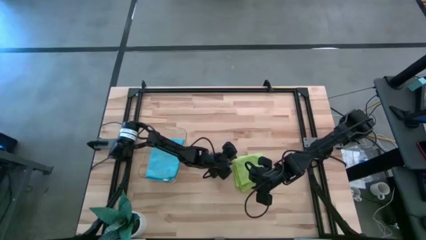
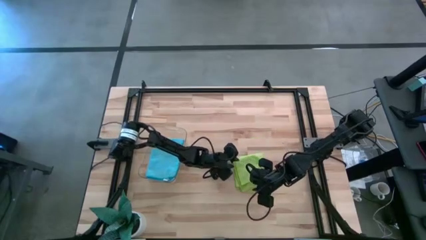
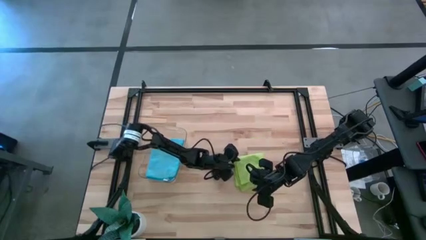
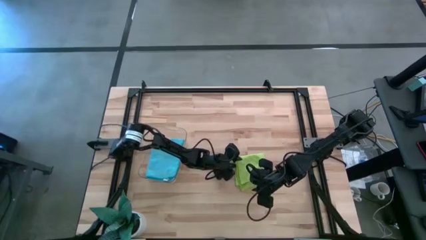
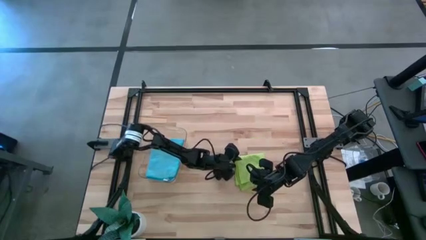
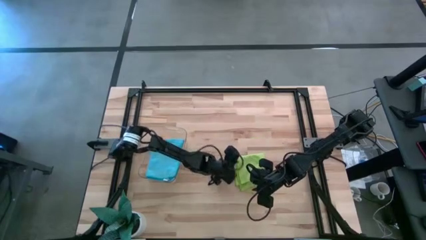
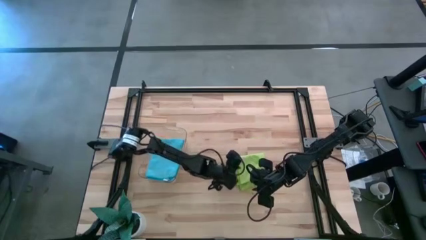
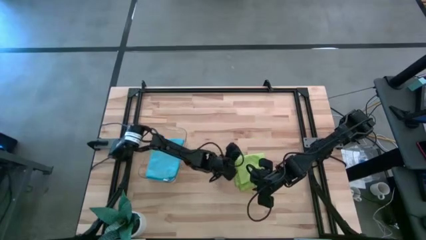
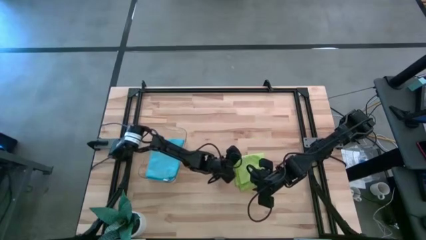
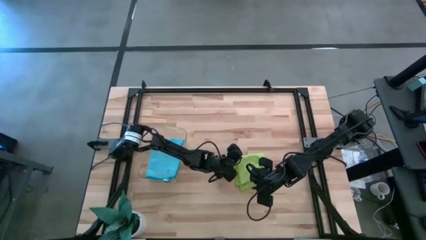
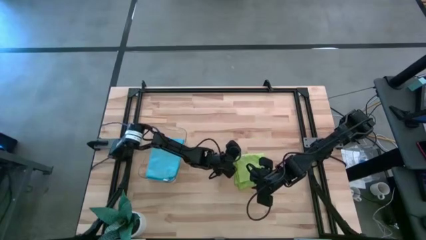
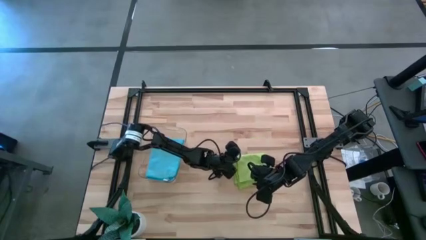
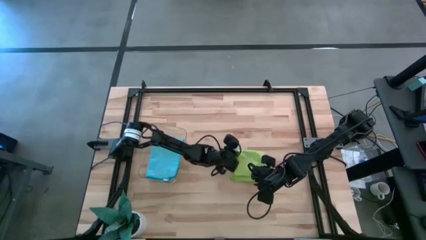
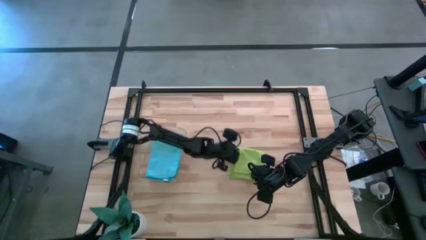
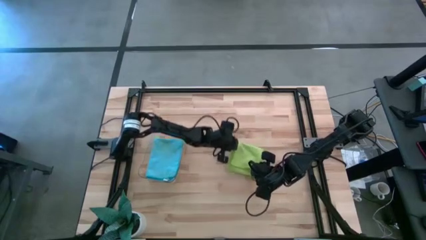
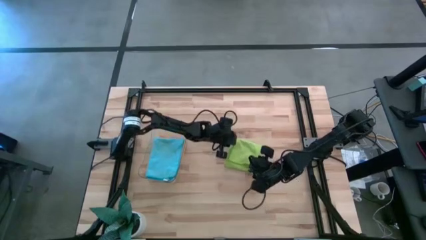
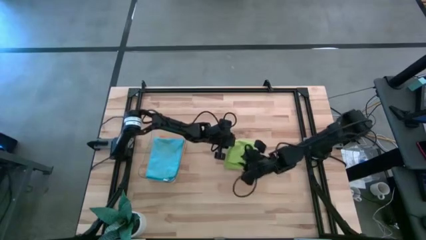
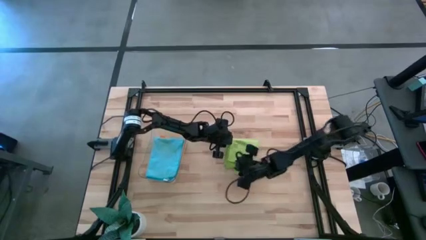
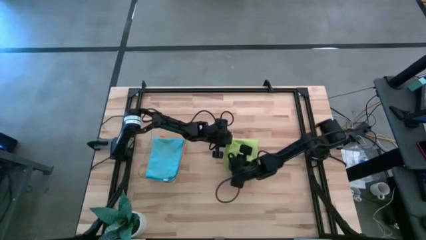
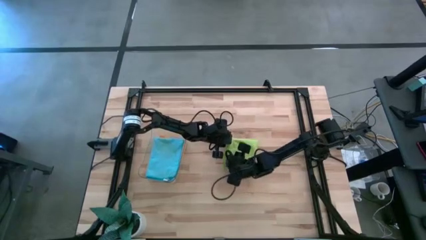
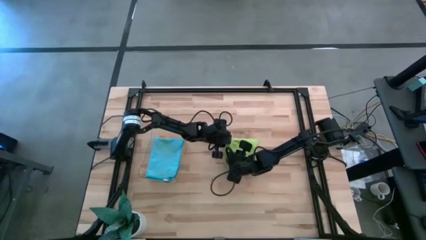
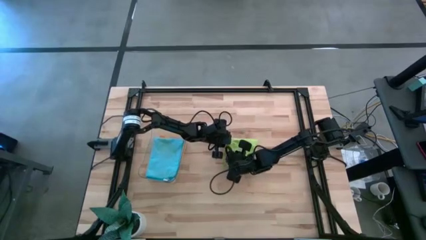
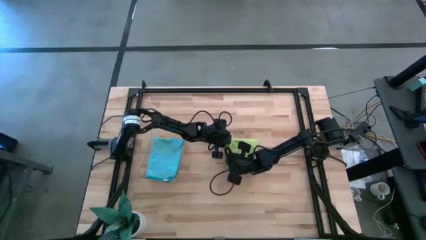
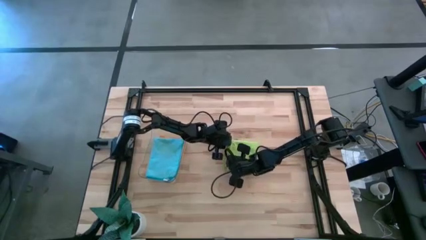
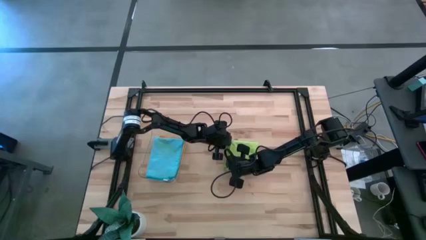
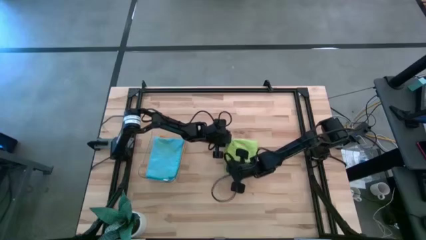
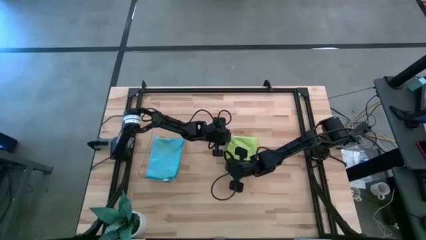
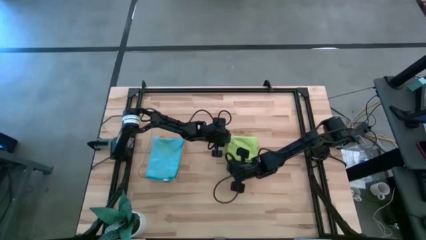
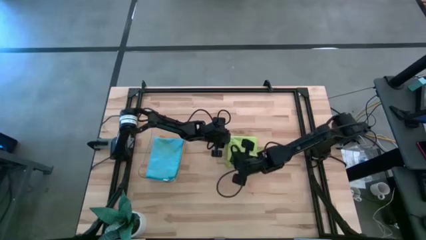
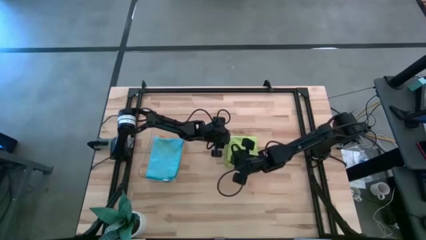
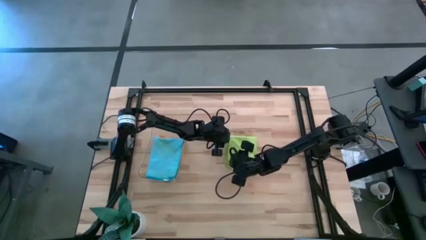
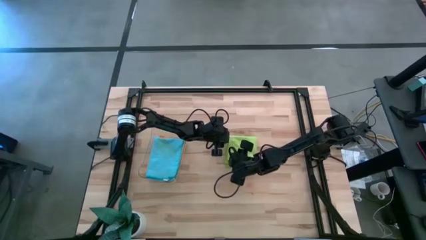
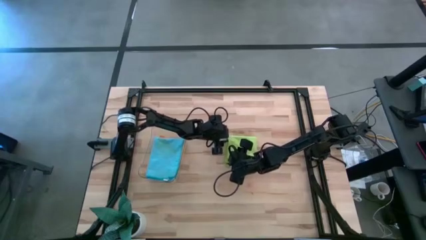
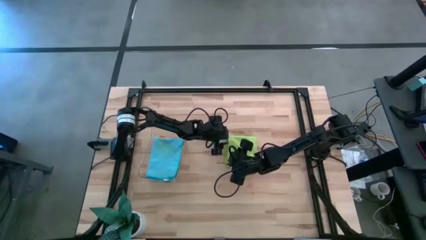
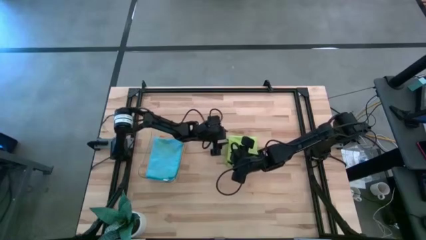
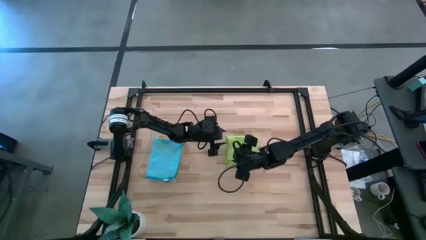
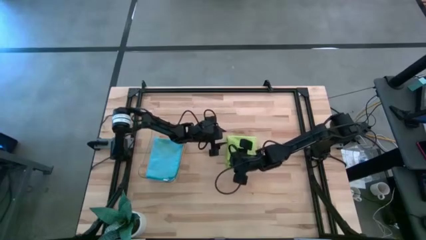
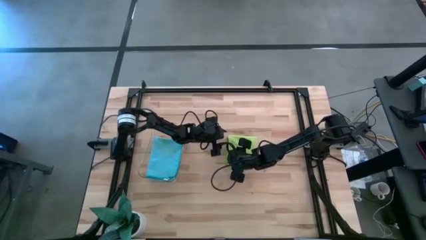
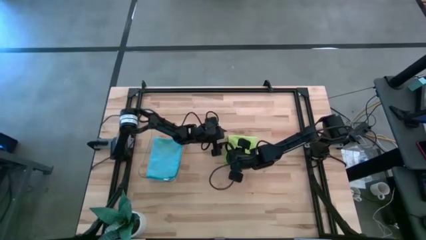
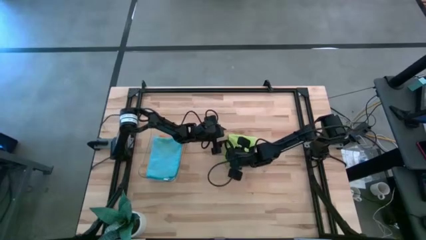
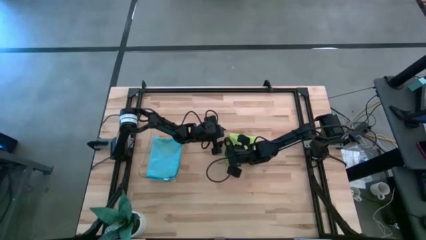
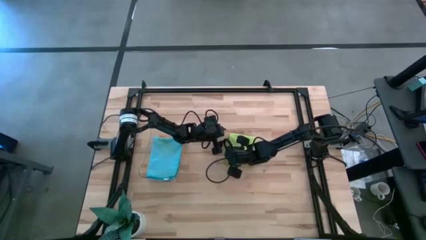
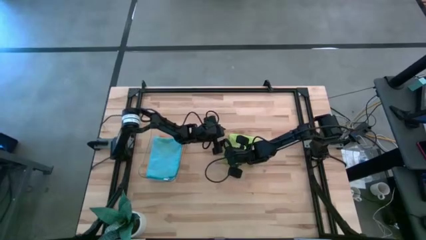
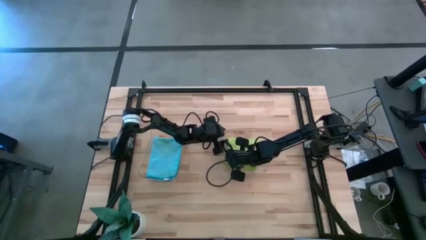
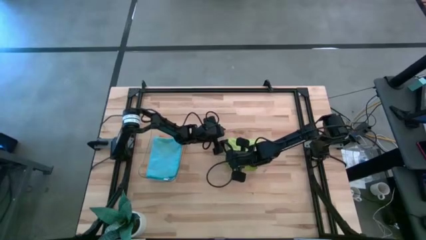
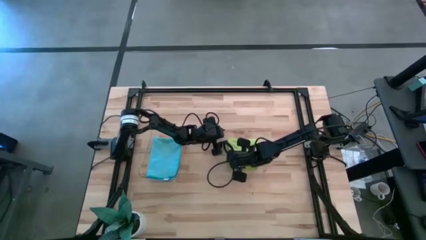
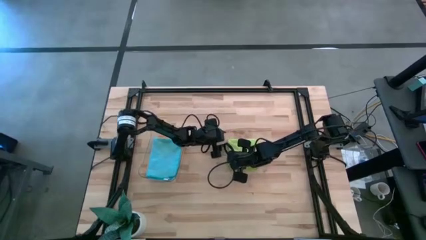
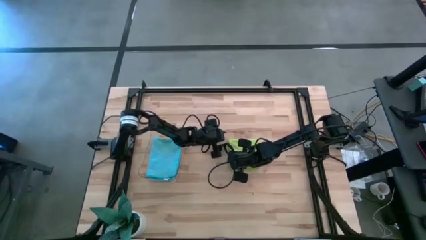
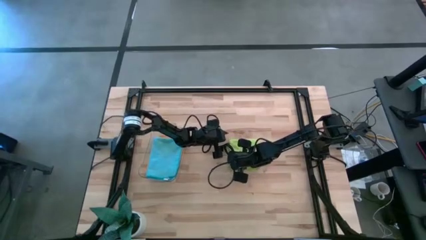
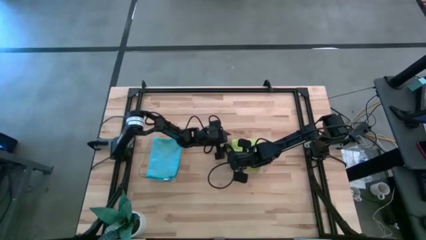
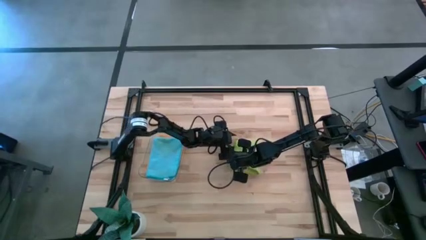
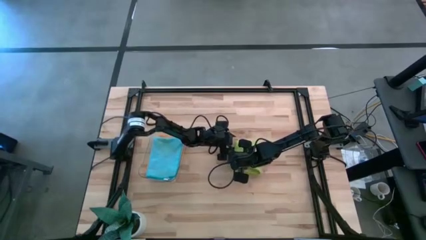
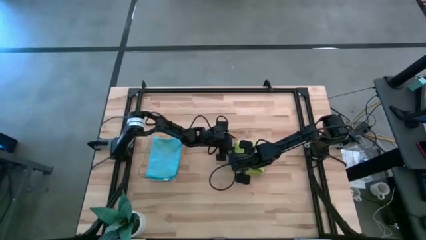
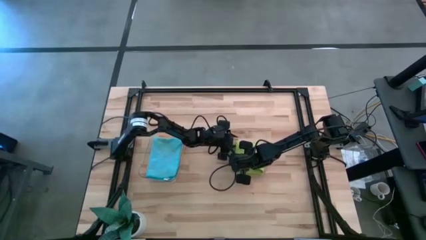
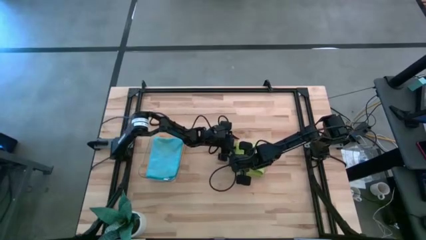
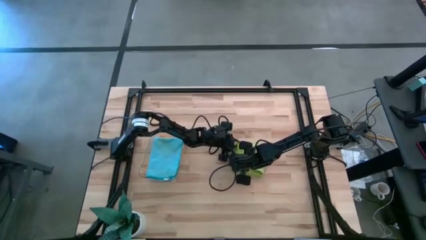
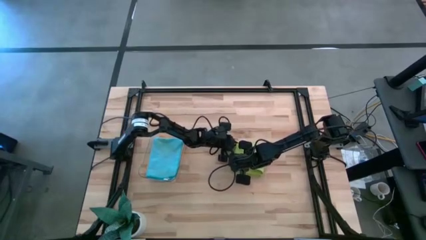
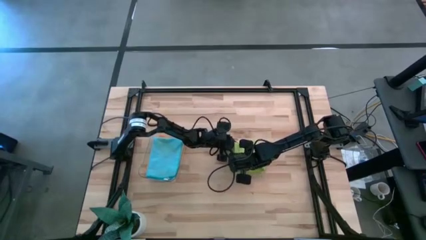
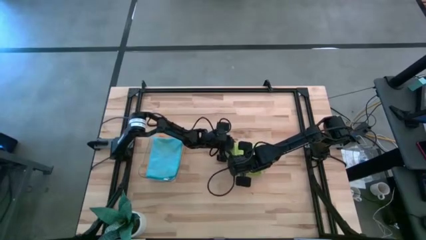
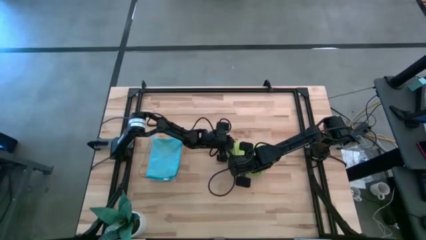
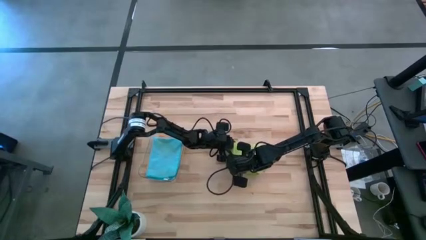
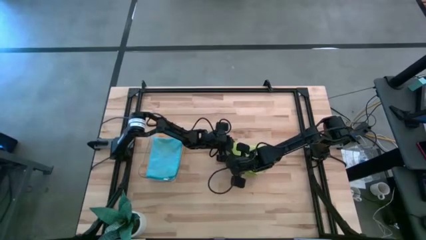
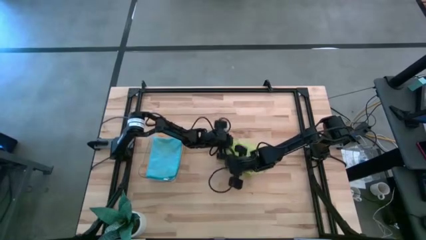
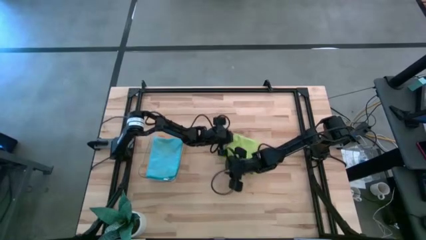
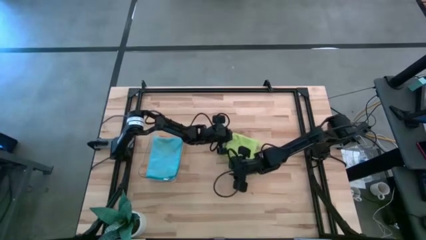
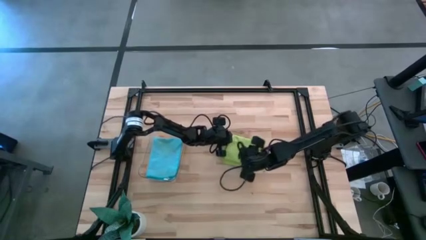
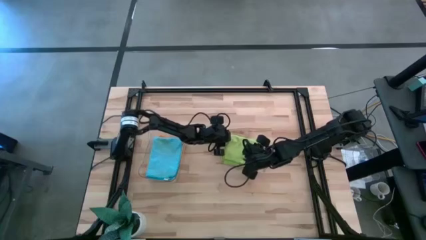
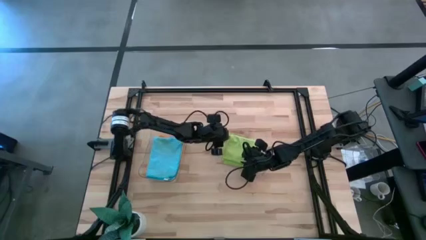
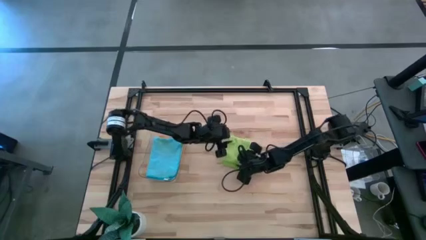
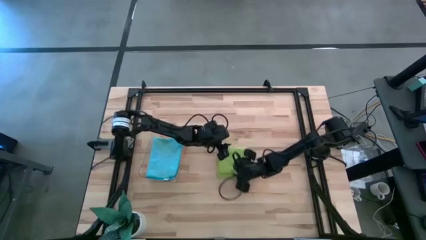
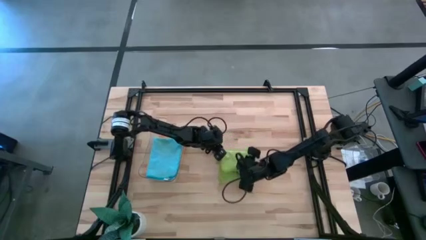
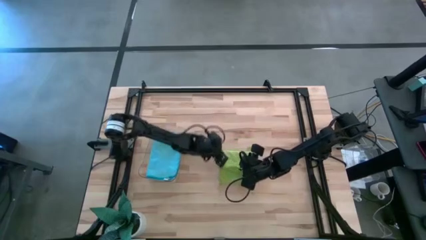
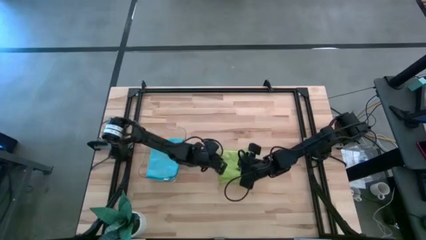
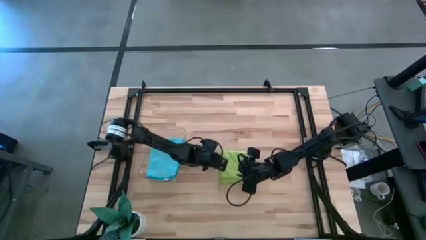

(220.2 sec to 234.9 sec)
Task: Fold microfiber towels
Fold the green microfiber towel on the table
